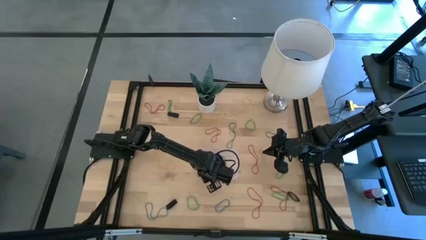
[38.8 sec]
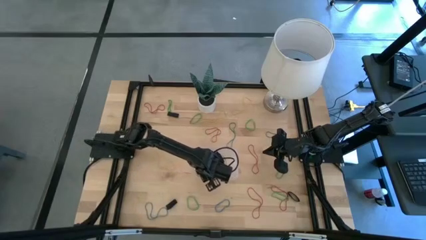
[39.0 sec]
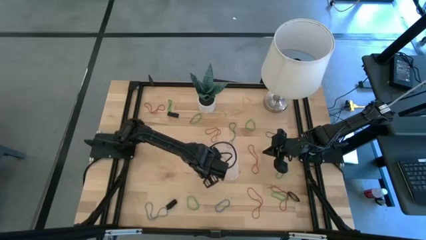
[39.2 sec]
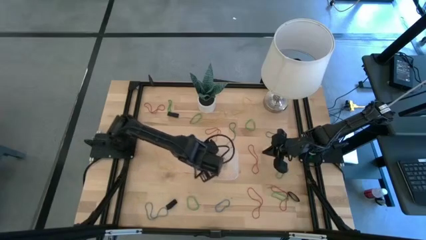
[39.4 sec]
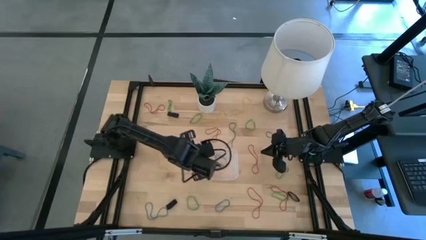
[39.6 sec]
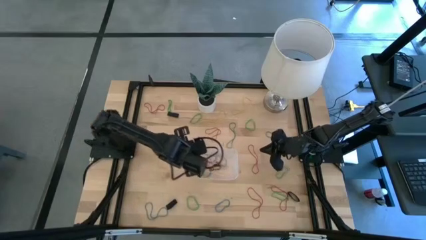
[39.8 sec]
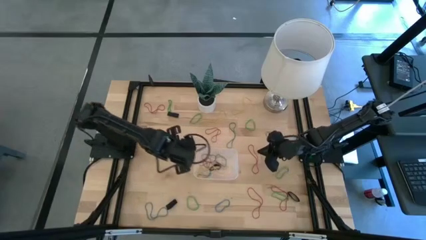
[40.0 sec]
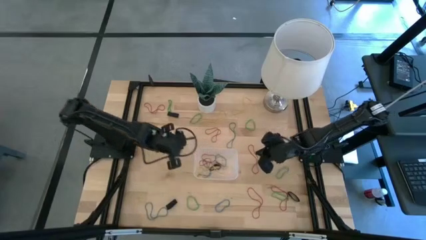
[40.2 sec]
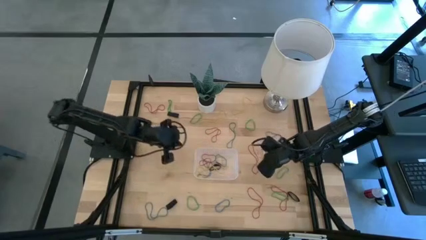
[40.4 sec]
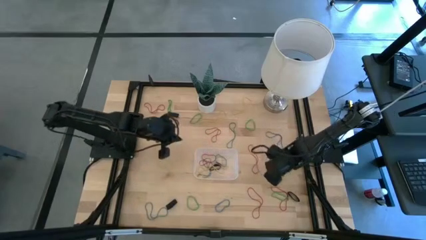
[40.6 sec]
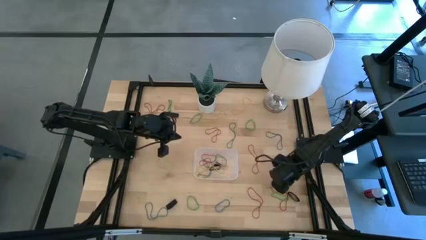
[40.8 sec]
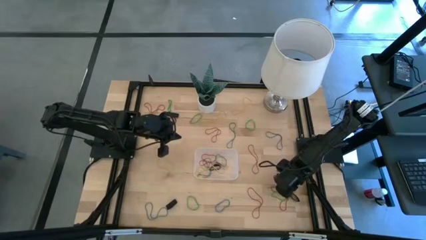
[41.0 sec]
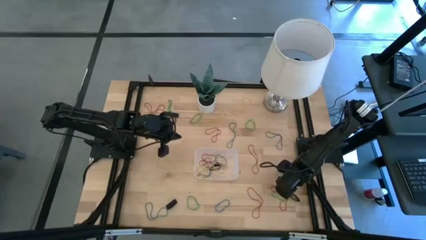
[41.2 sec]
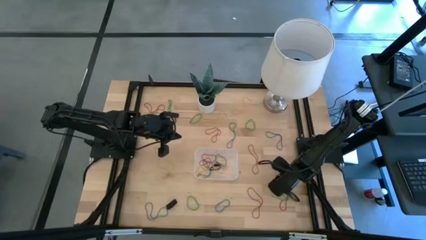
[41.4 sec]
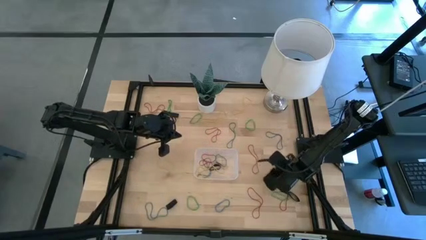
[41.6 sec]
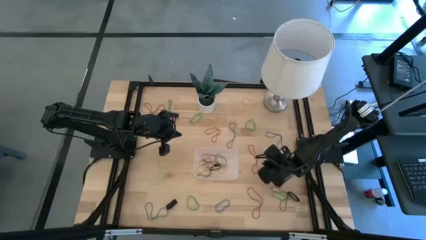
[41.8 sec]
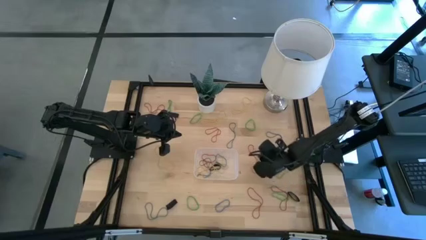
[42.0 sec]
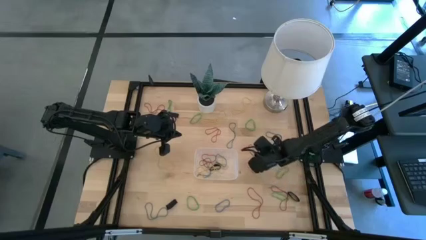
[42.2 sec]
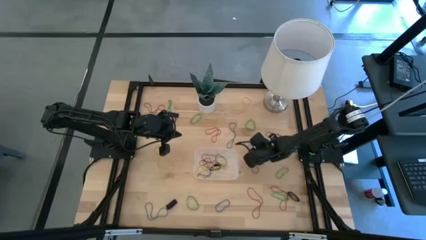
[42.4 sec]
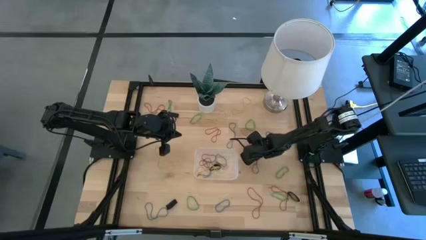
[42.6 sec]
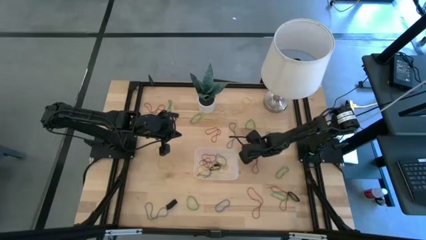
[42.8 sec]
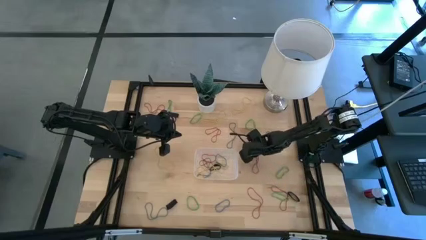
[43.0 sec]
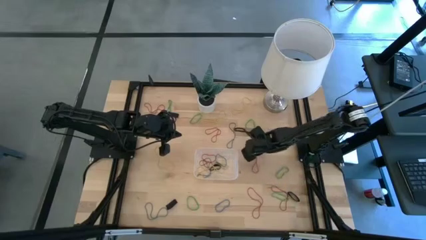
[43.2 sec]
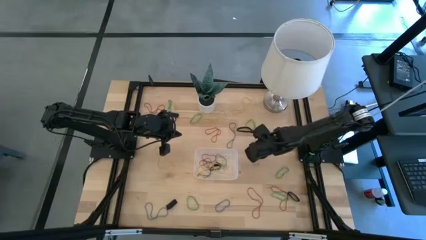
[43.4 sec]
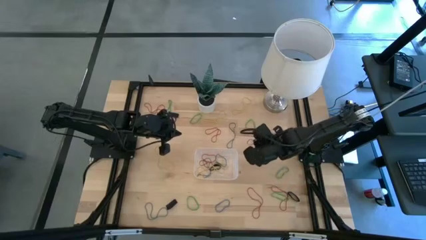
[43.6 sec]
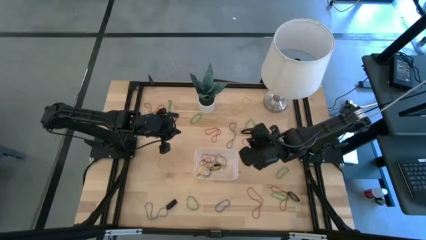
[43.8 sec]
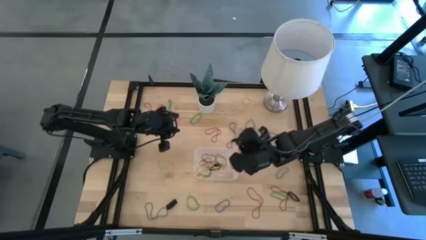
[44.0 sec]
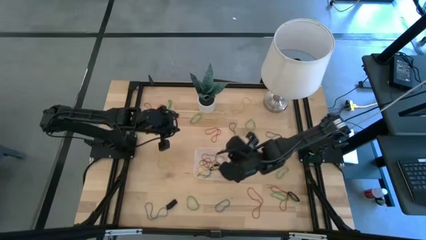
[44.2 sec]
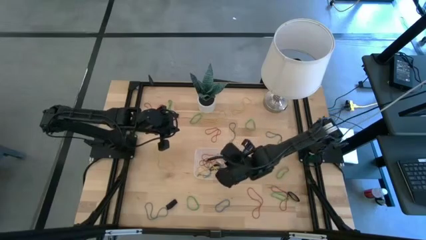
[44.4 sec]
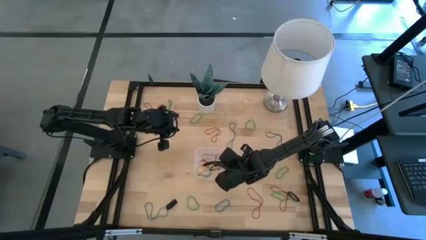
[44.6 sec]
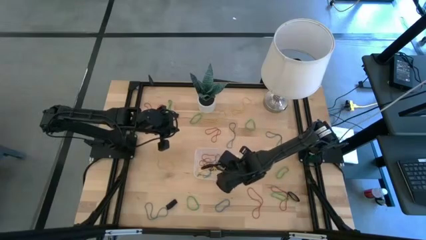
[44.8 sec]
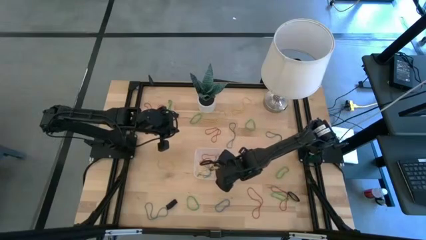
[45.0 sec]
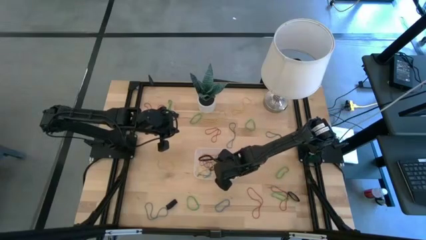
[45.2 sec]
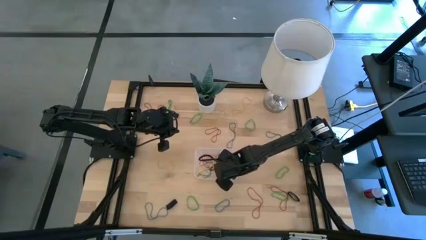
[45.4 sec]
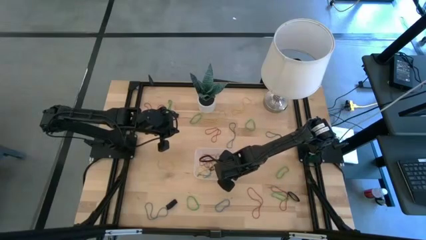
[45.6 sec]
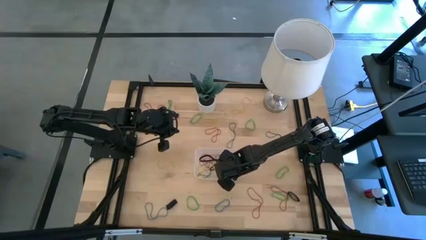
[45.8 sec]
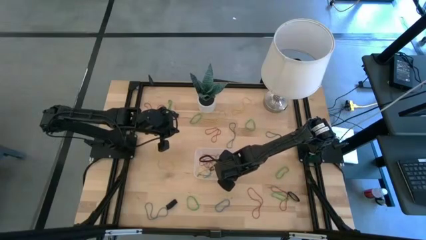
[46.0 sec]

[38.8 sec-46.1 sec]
Task: Pick and place rubber bands into bin
Put the red rubber band into the transparent bin

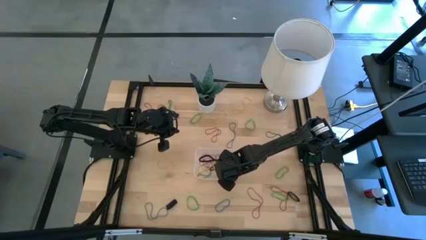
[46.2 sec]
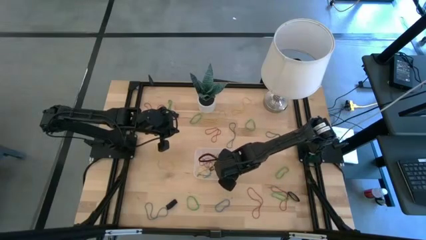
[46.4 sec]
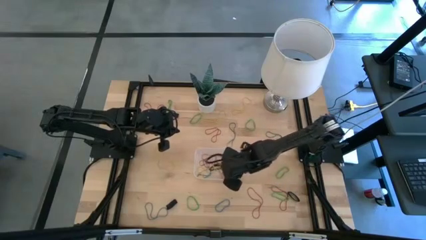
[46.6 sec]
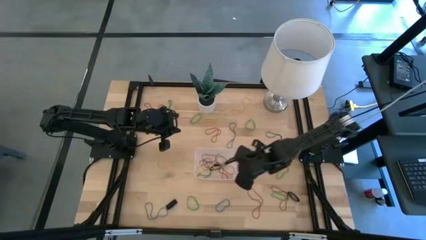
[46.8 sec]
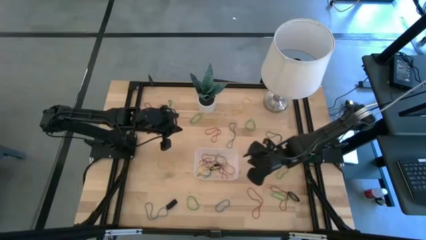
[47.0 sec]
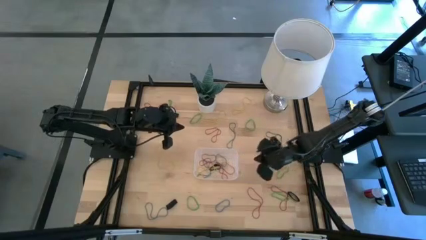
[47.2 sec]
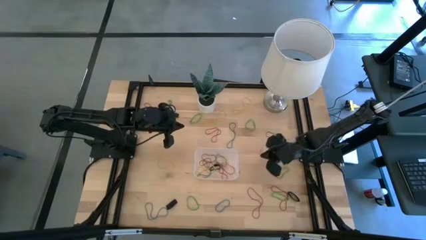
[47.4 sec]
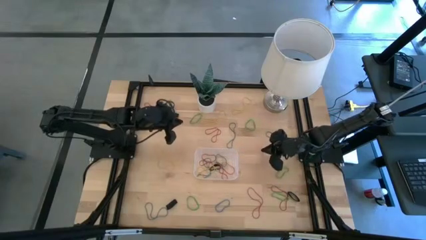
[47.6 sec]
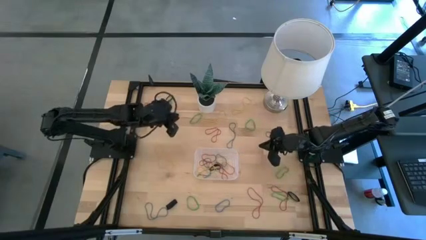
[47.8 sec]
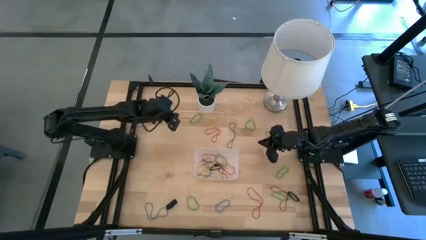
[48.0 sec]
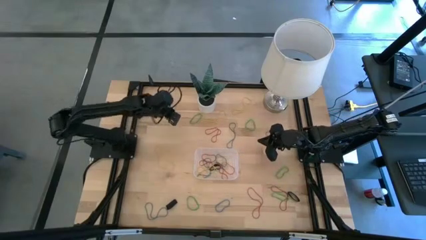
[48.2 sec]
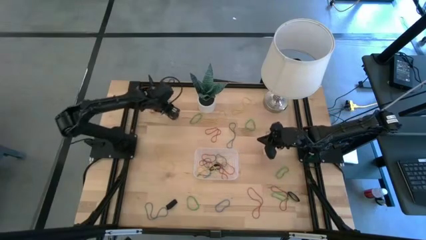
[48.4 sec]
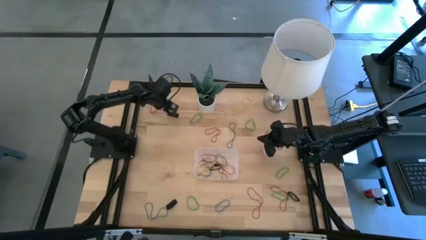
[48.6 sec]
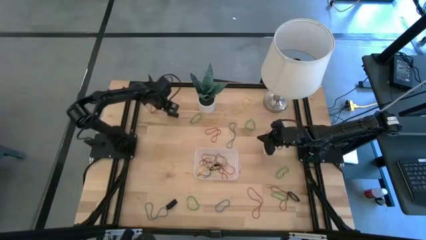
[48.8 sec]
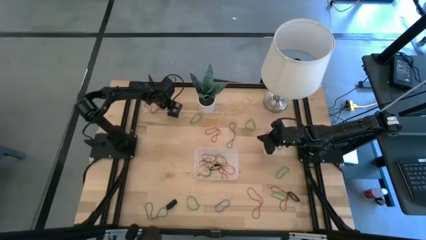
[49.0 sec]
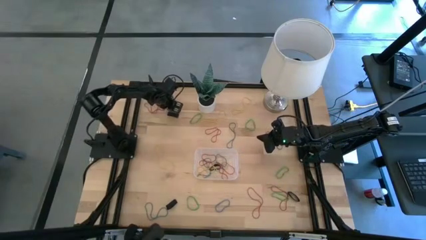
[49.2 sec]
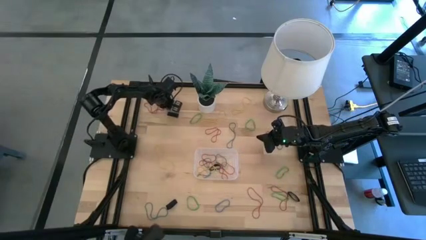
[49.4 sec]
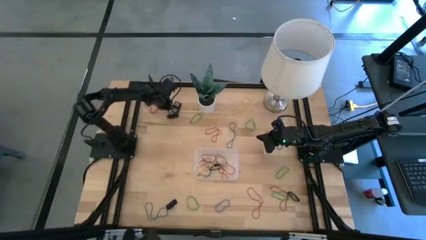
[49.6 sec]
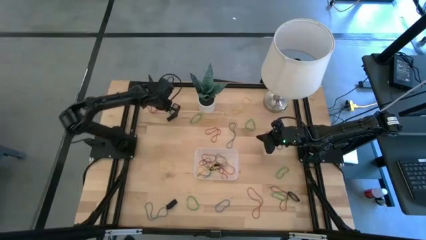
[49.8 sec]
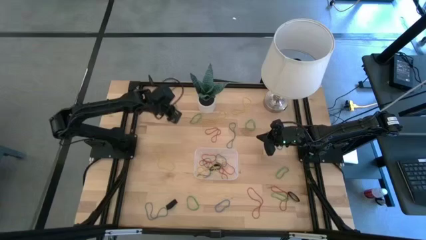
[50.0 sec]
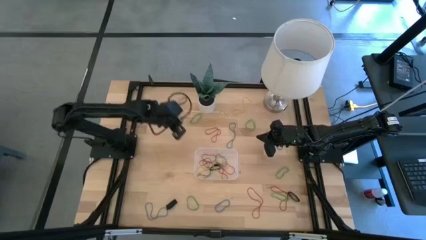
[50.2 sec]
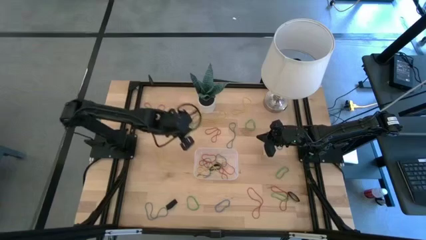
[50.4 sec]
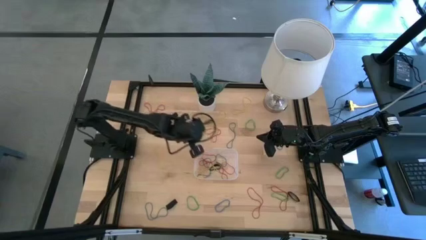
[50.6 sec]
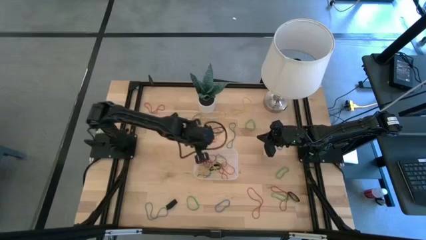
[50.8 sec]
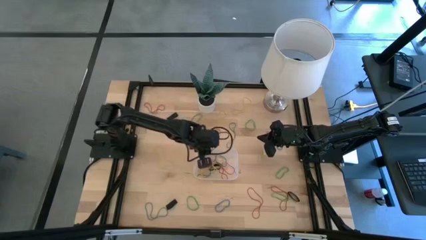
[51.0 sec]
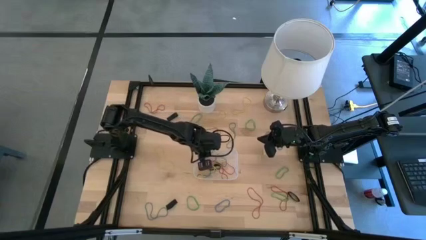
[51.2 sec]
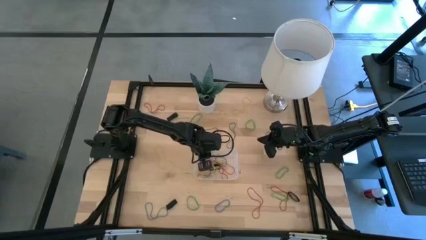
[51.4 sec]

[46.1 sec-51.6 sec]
Put the green rubber band into the transparent bin

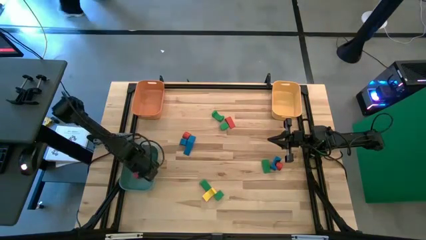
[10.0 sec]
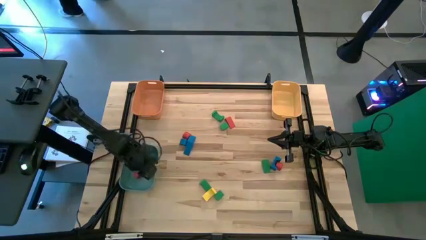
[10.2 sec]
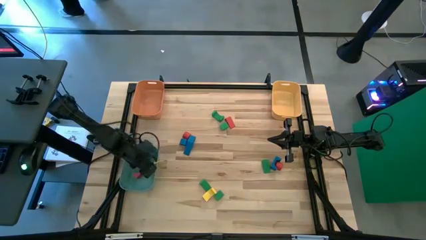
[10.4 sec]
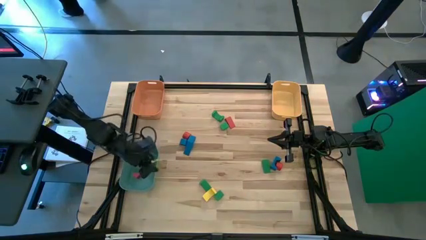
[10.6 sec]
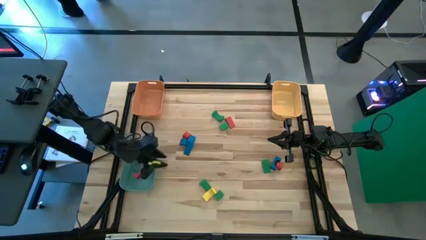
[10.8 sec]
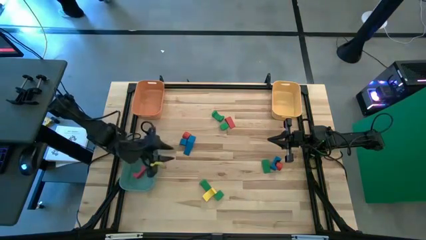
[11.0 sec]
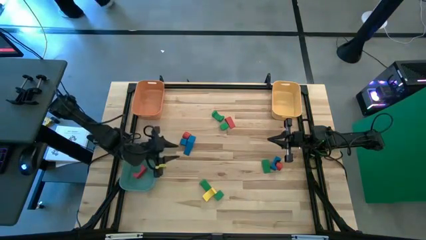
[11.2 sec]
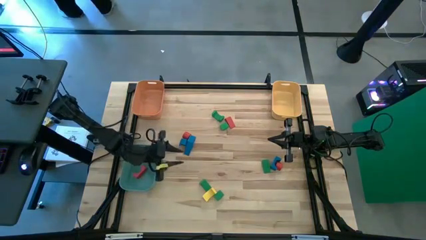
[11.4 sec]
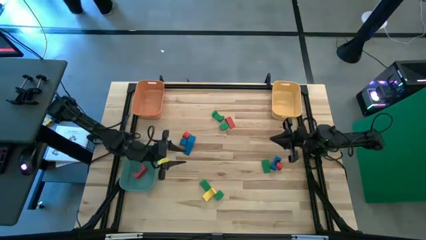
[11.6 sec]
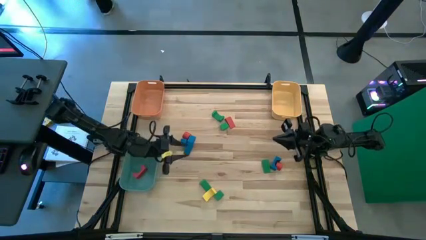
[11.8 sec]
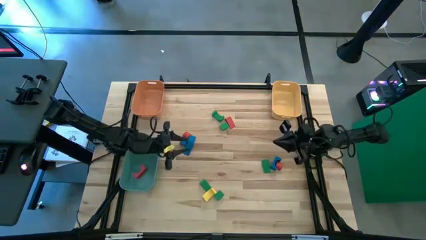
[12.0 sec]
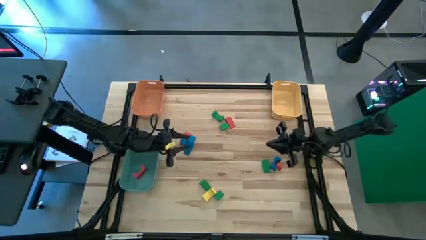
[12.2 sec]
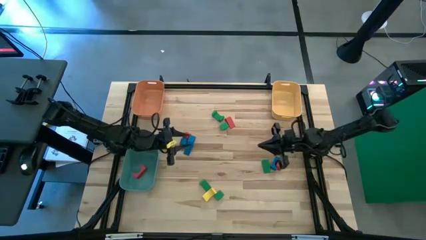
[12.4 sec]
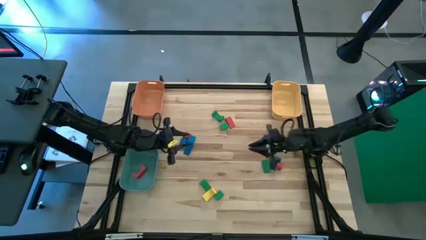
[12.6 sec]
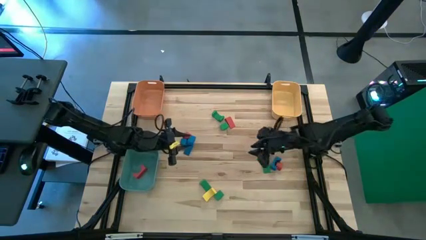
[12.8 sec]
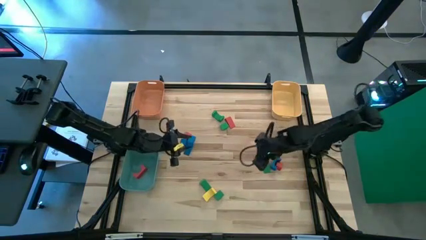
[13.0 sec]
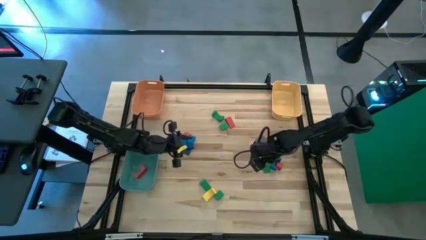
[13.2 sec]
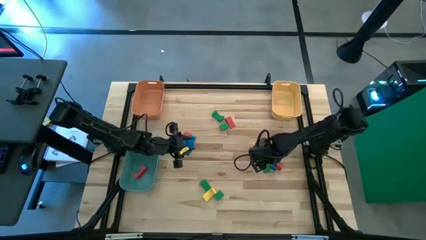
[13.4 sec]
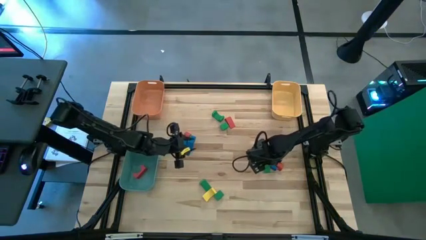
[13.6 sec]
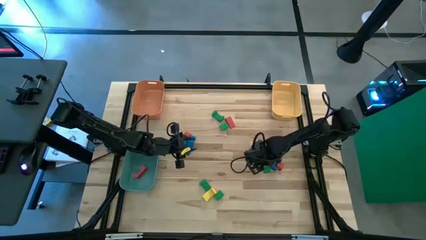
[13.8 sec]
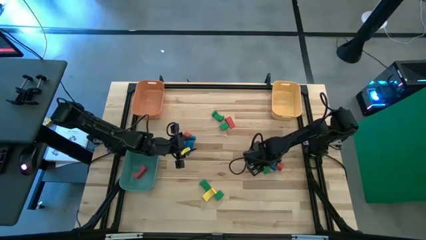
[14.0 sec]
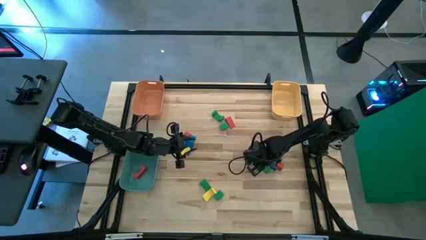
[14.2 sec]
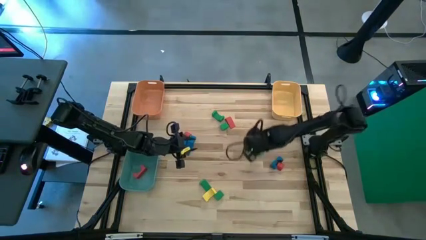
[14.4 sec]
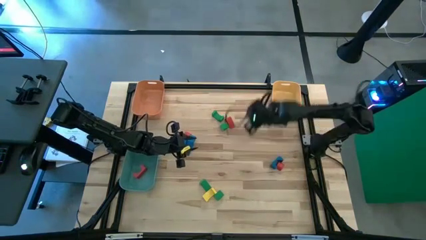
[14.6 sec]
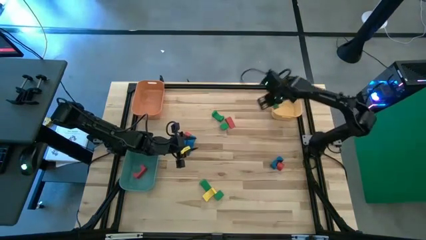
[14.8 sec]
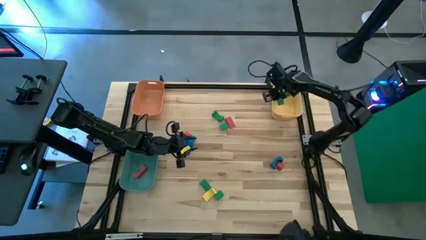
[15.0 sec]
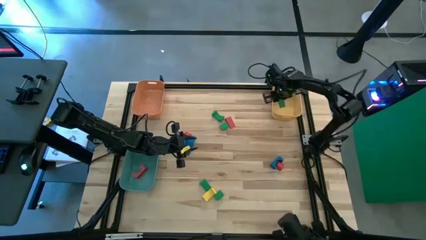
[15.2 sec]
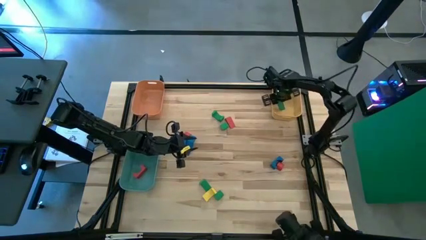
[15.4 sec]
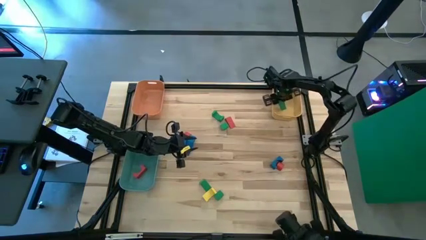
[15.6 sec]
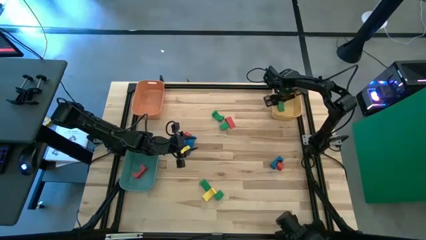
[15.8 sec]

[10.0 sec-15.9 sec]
Task: Sort blocks by size
Put the green triangular block into the yellow bin
